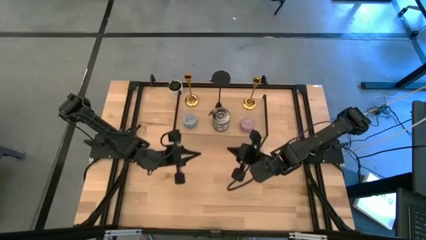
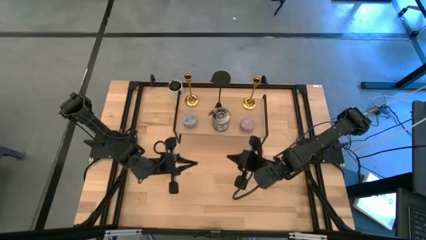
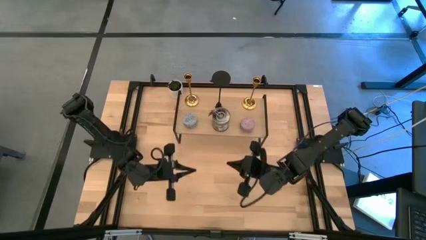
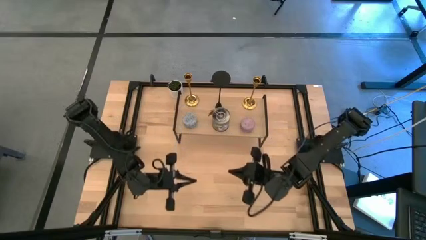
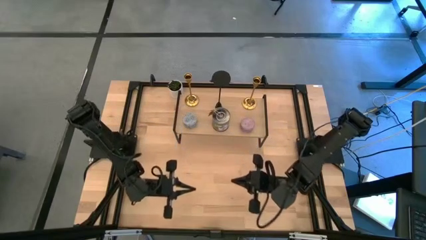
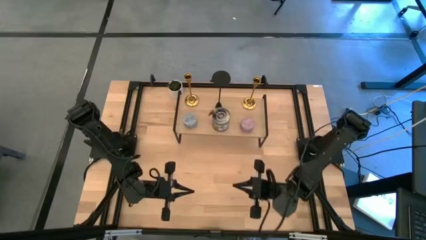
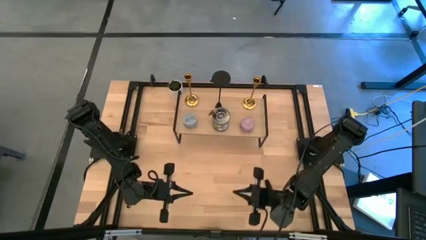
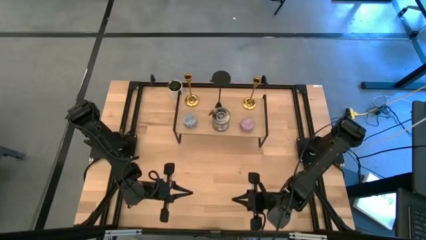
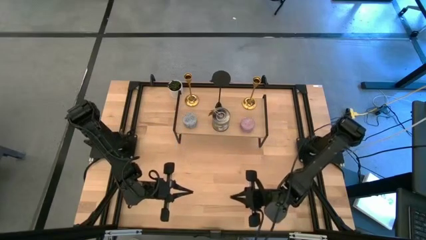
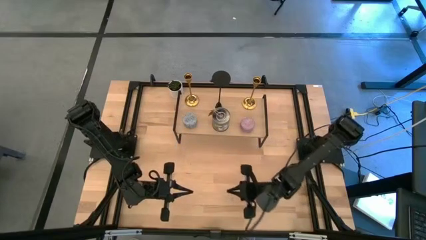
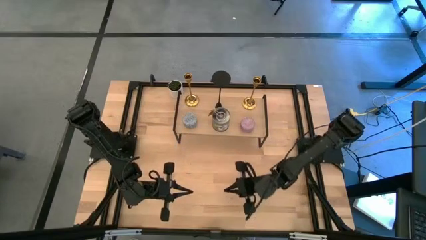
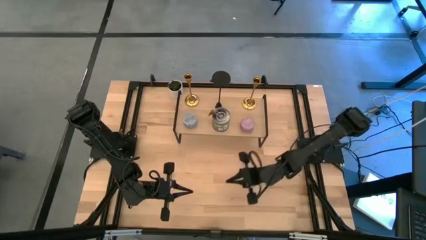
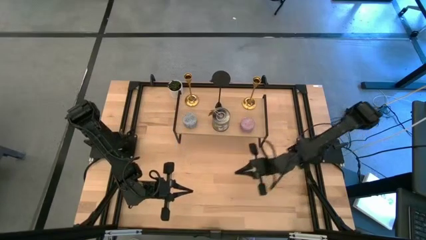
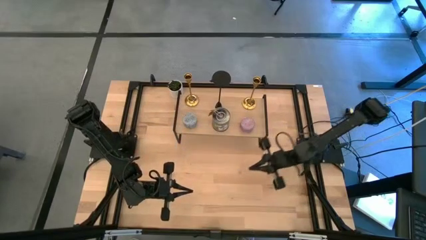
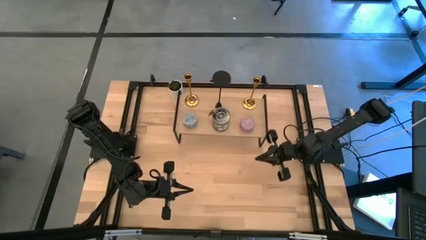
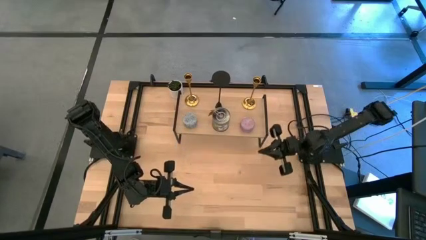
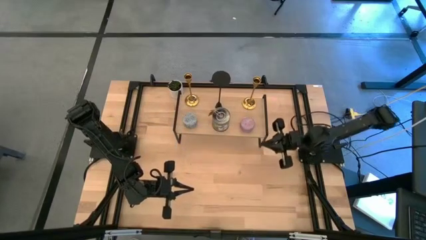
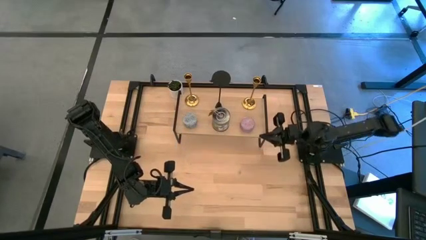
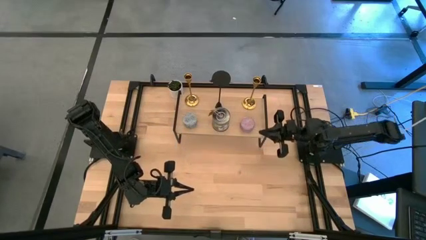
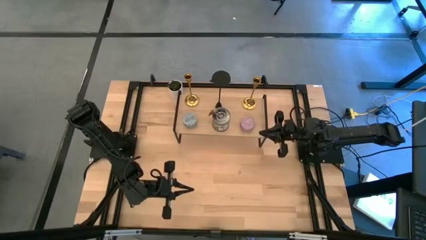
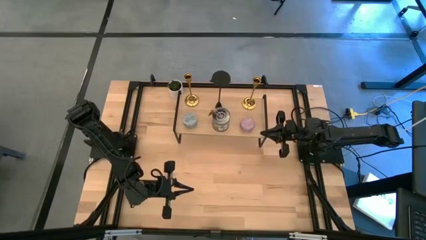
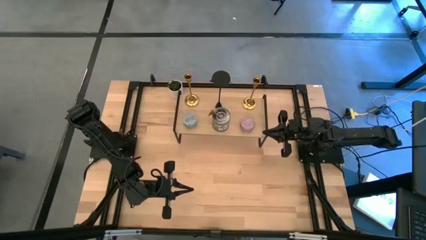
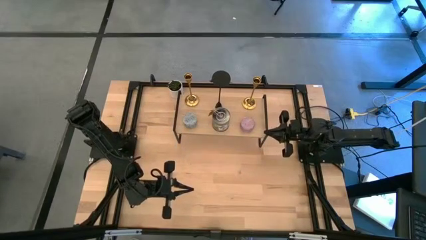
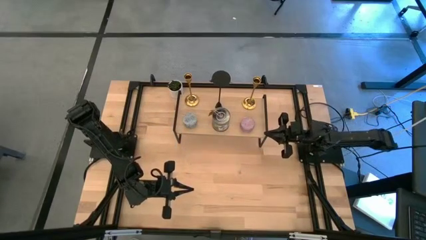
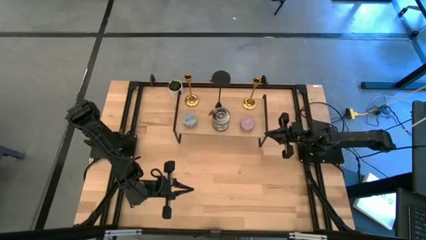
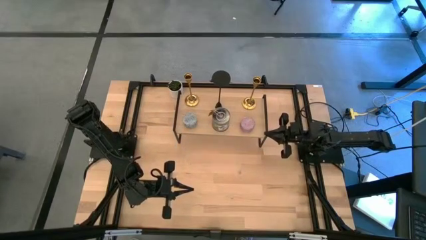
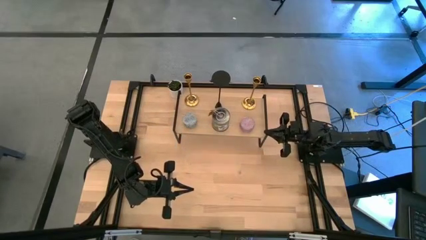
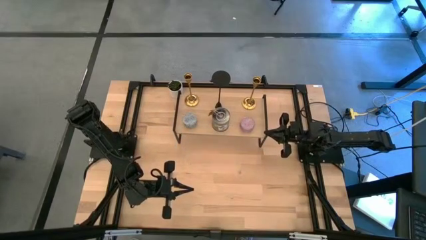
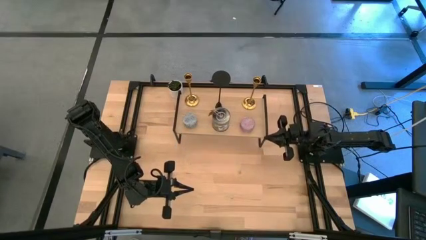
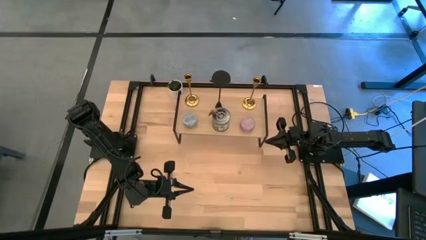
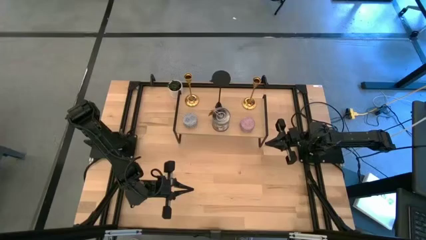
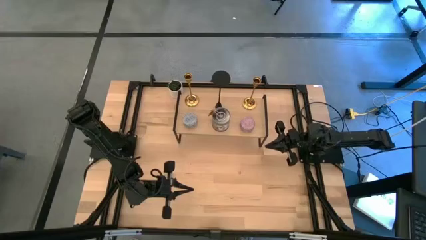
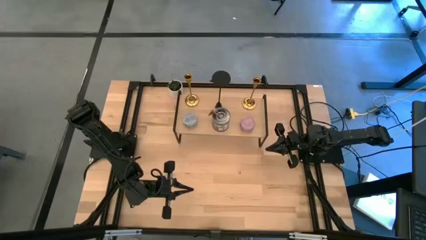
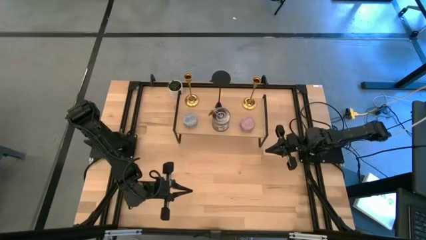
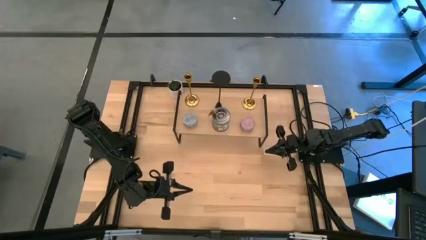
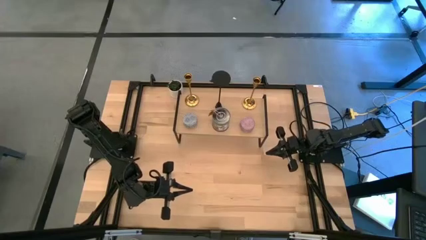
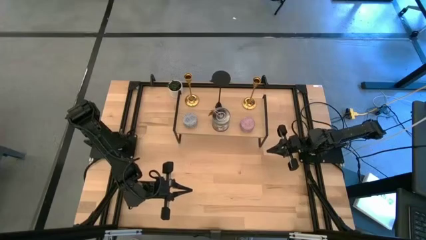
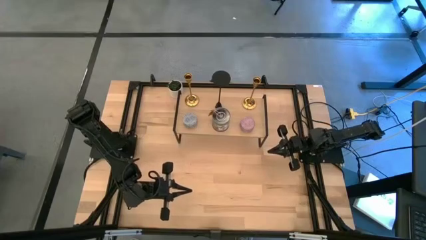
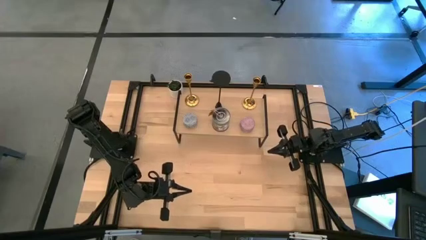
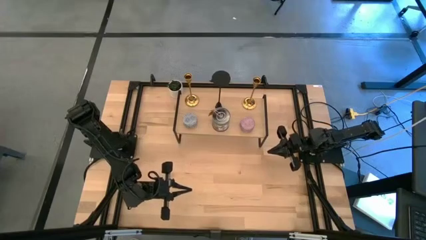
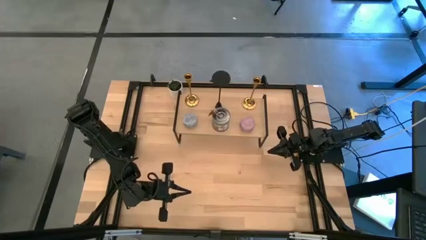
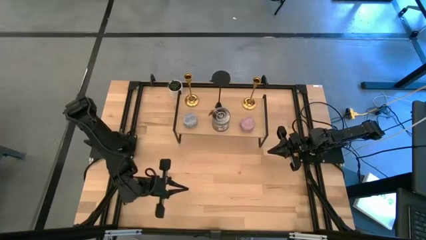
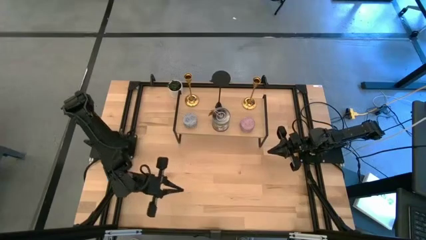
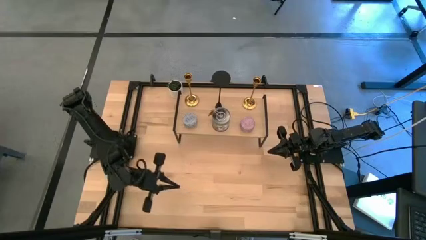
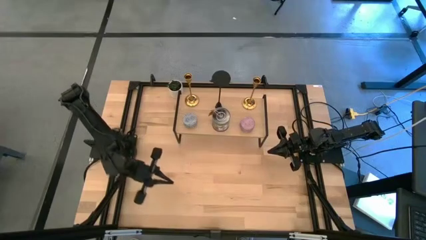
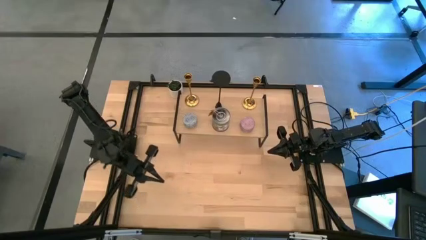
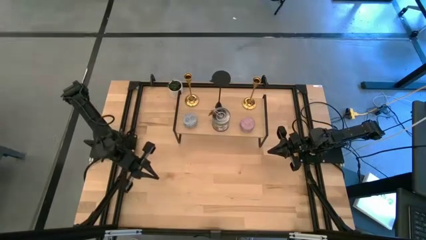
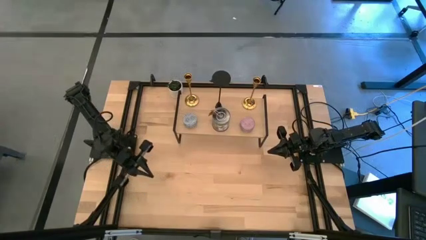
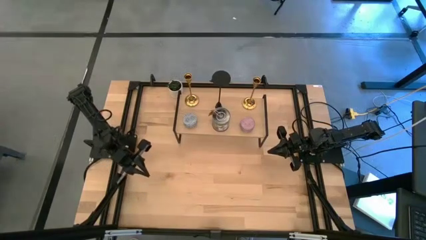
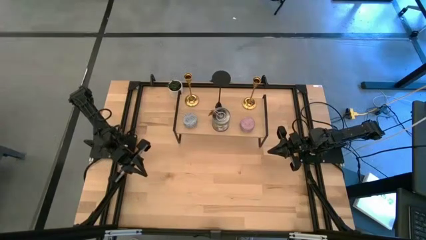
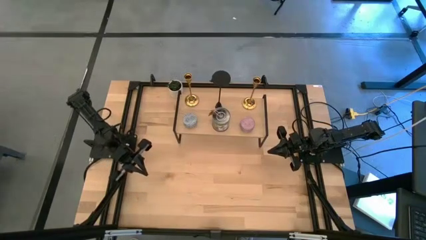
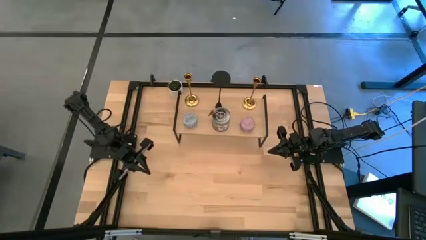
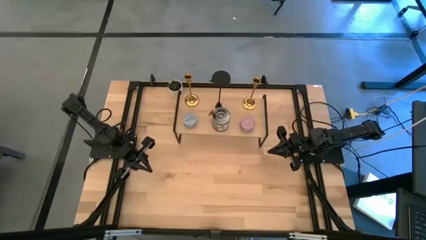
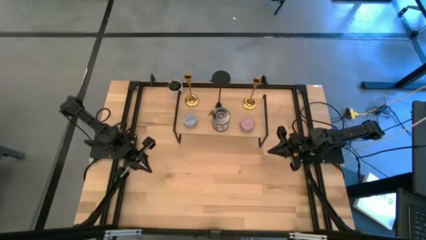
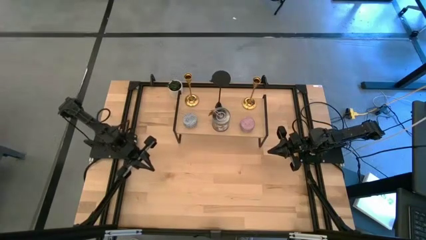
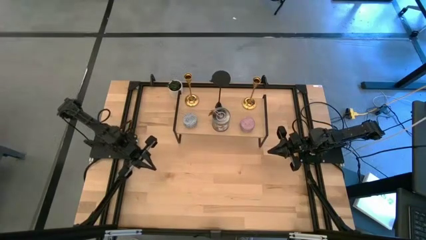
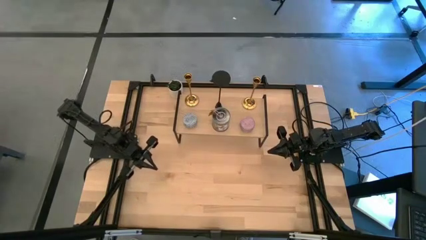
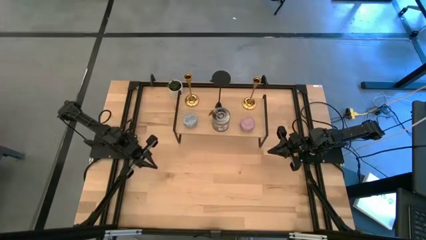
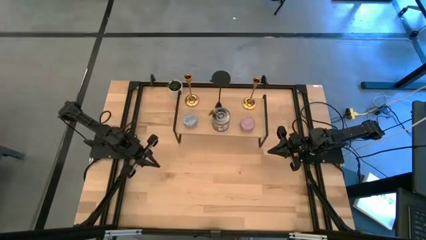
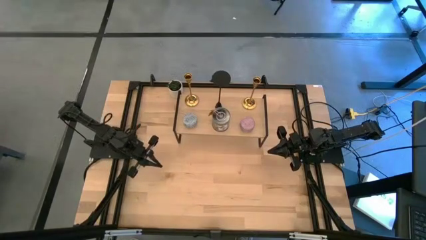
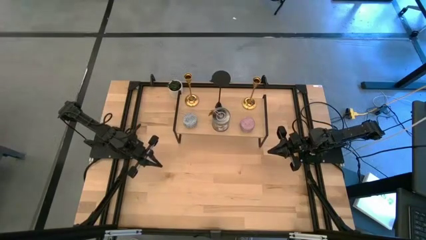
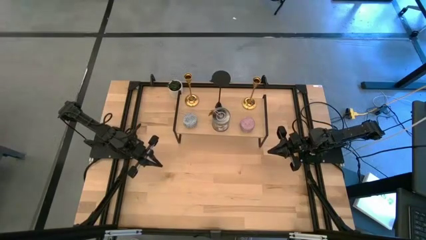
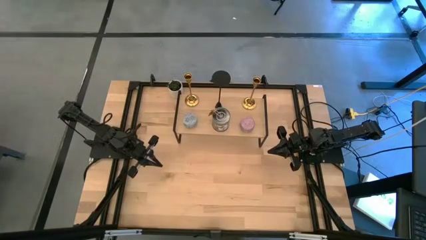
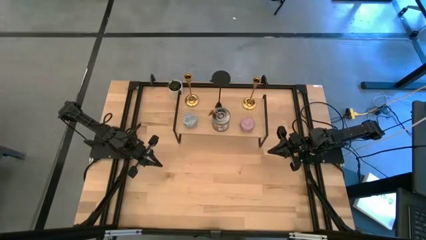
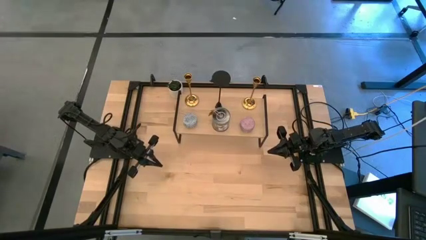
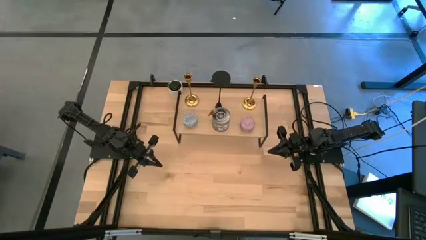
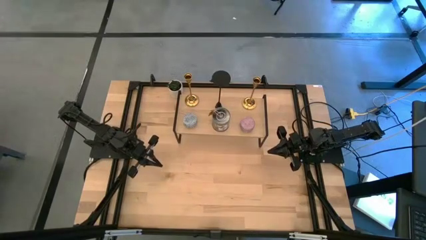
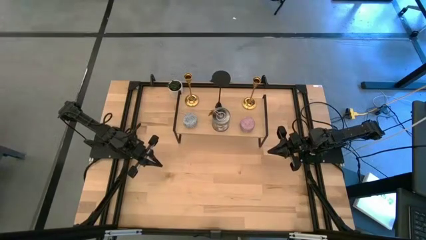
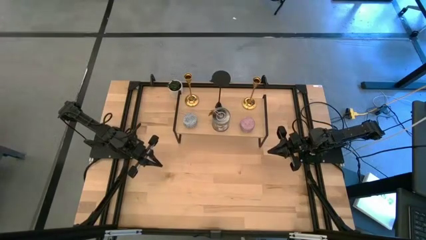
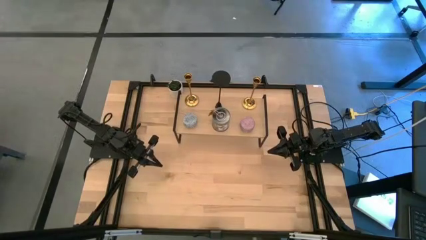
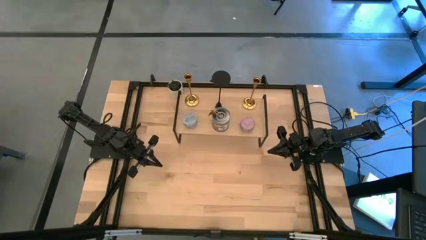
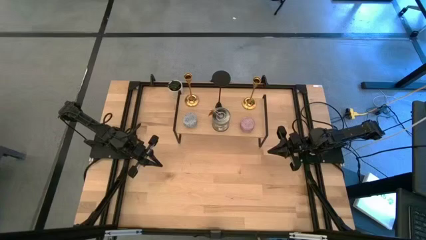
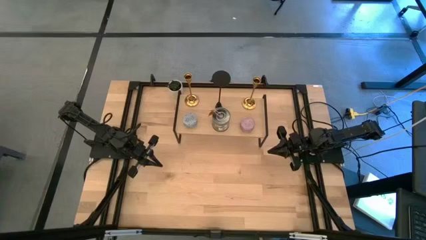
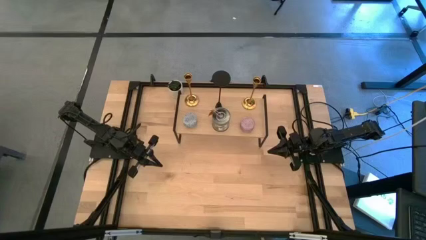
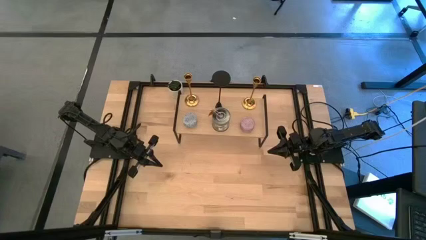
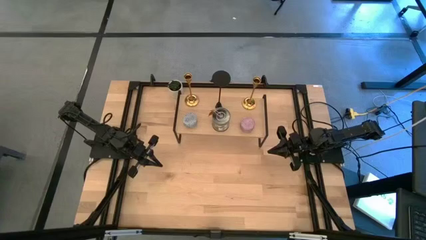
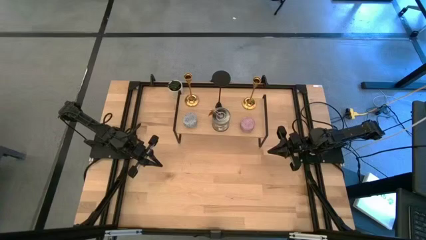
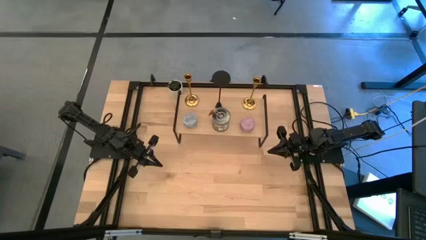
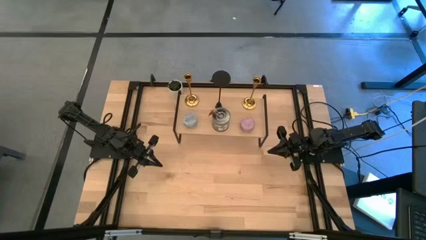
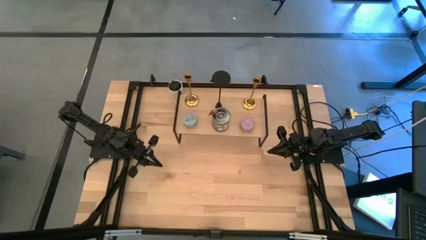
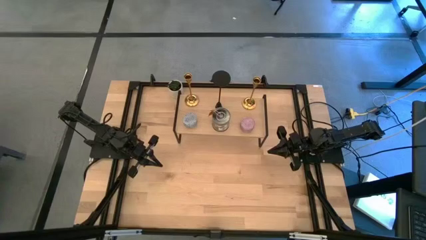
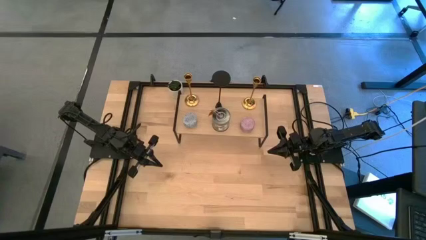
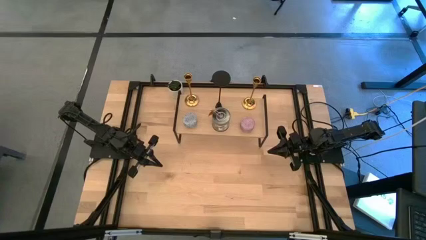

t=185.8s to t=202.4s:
Task: Pick & Place candle stick holders
Return to Home Position
